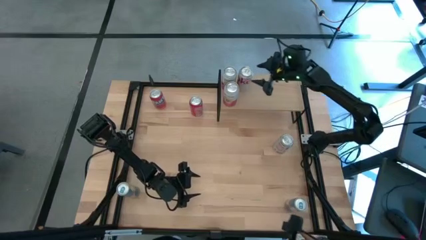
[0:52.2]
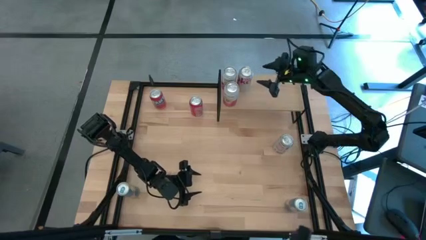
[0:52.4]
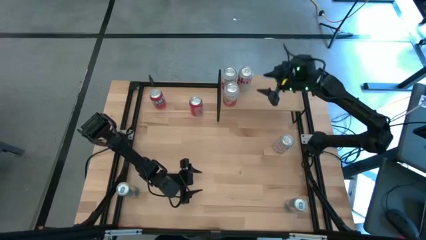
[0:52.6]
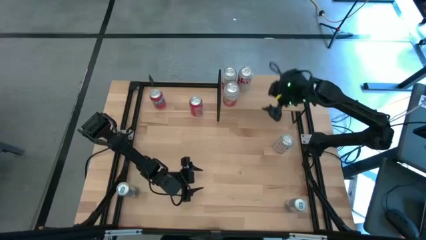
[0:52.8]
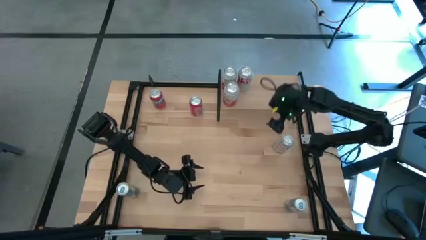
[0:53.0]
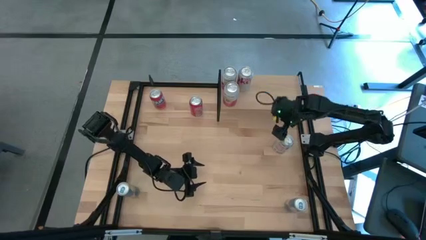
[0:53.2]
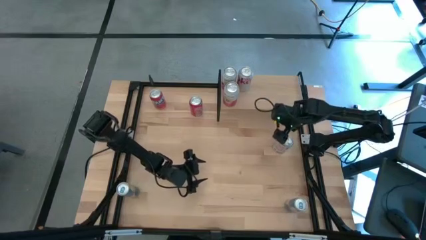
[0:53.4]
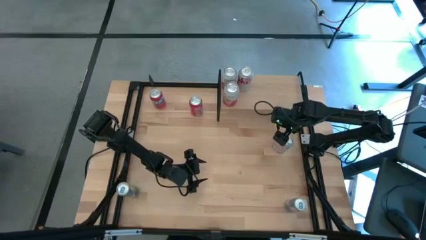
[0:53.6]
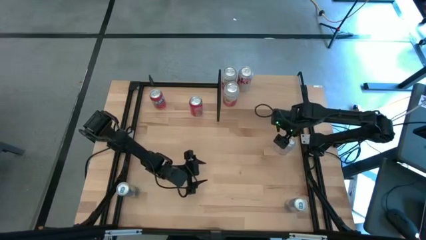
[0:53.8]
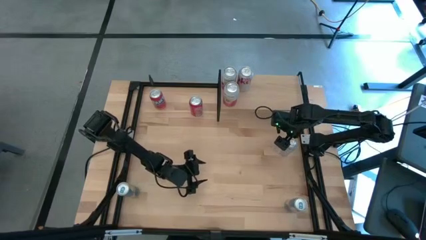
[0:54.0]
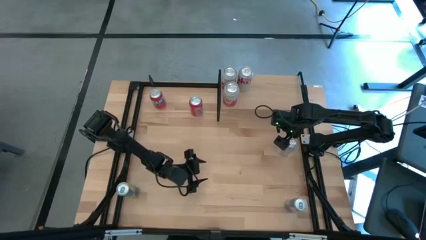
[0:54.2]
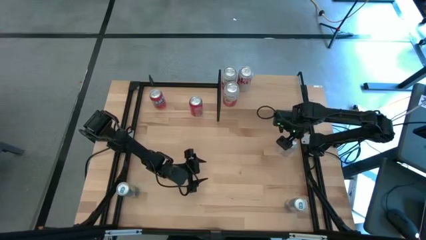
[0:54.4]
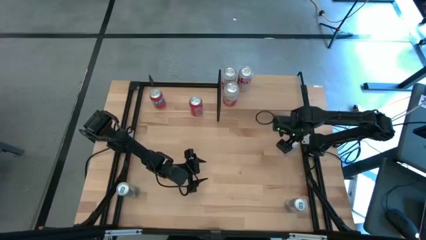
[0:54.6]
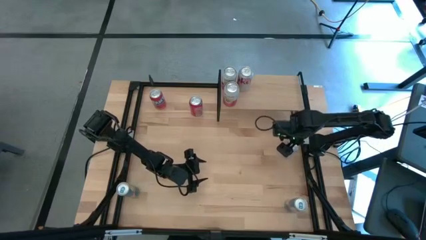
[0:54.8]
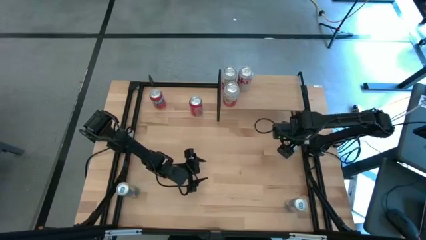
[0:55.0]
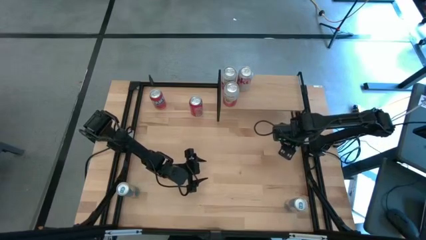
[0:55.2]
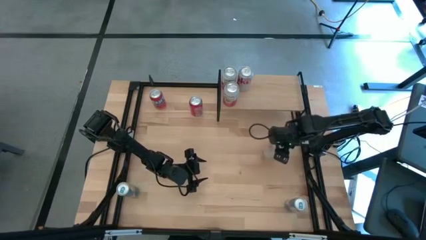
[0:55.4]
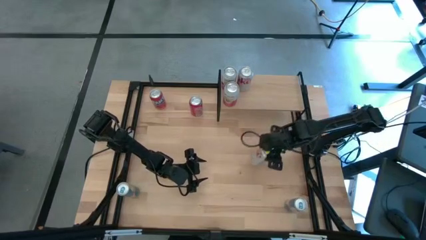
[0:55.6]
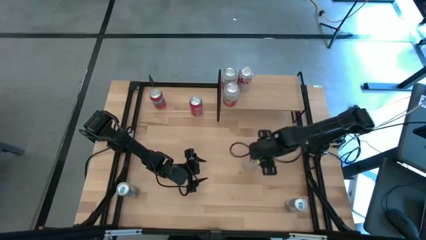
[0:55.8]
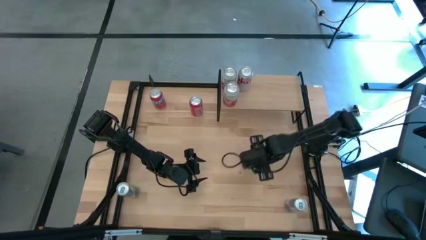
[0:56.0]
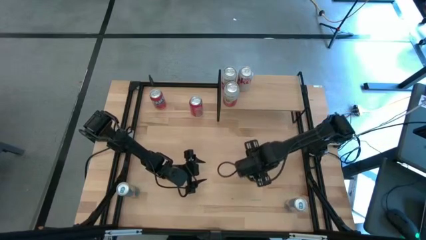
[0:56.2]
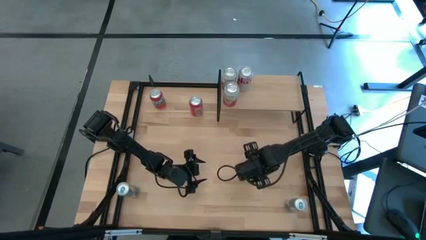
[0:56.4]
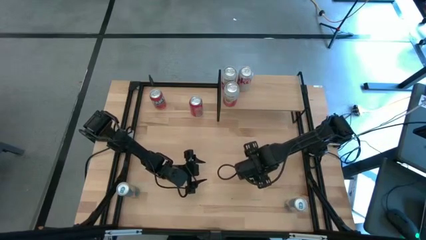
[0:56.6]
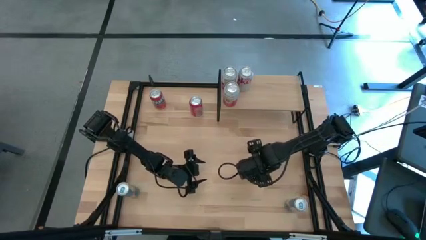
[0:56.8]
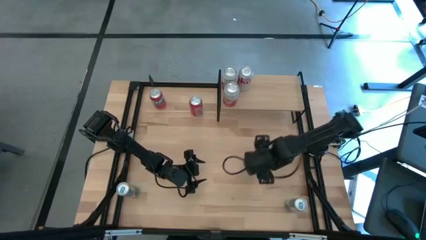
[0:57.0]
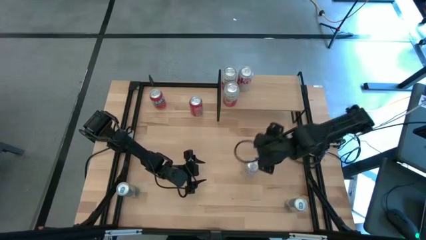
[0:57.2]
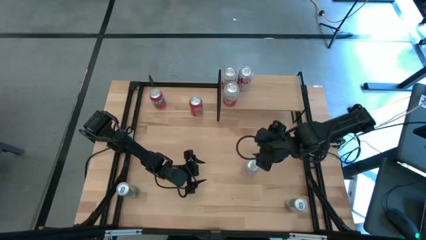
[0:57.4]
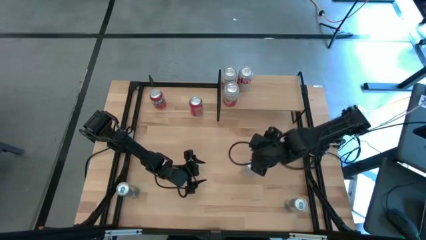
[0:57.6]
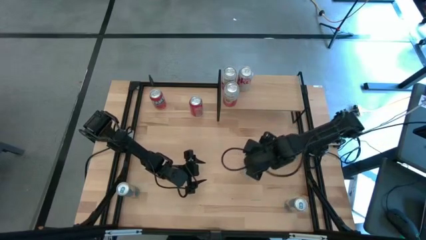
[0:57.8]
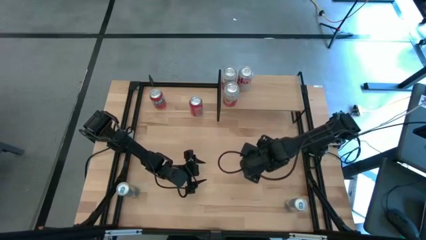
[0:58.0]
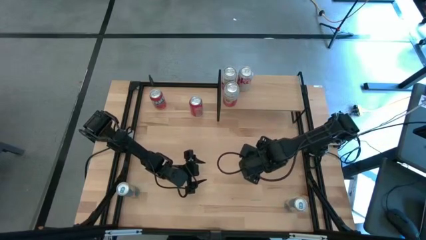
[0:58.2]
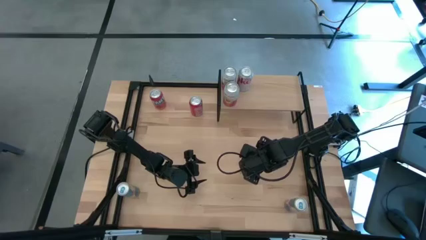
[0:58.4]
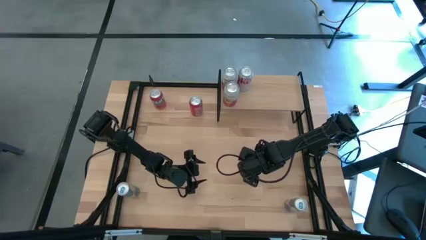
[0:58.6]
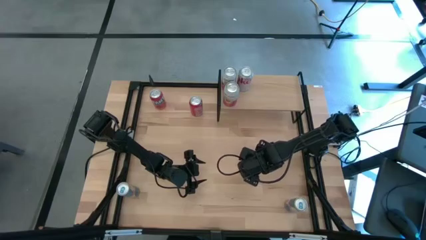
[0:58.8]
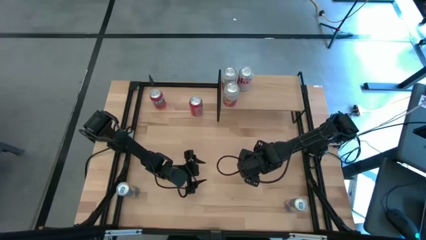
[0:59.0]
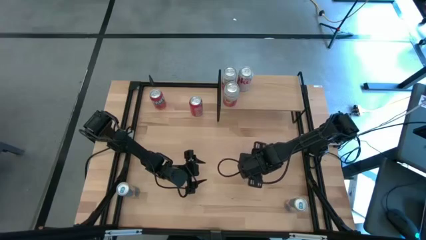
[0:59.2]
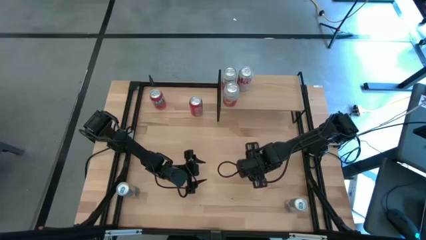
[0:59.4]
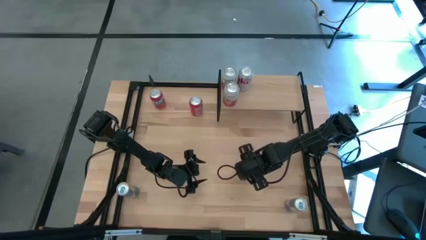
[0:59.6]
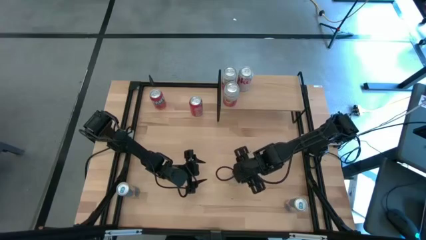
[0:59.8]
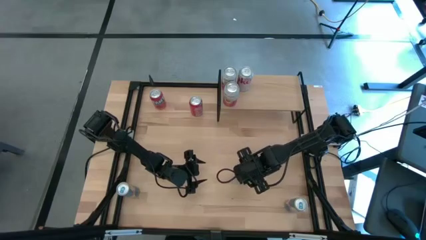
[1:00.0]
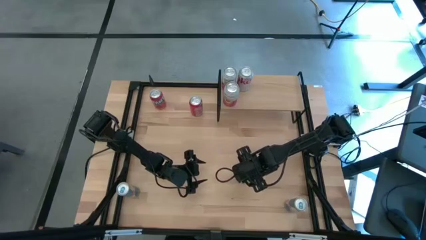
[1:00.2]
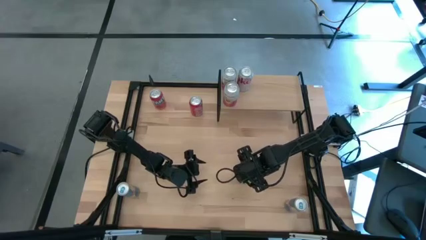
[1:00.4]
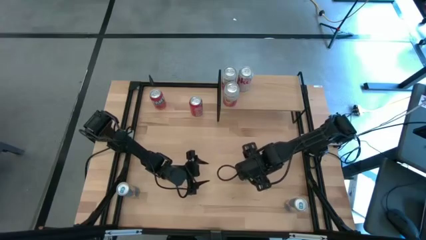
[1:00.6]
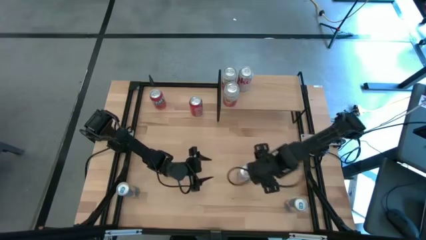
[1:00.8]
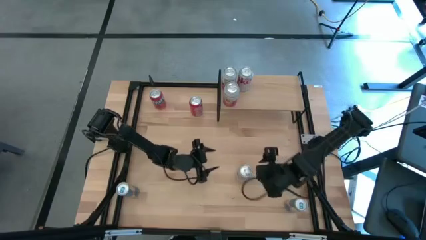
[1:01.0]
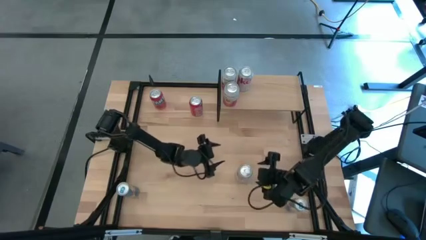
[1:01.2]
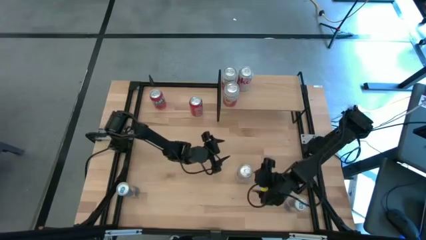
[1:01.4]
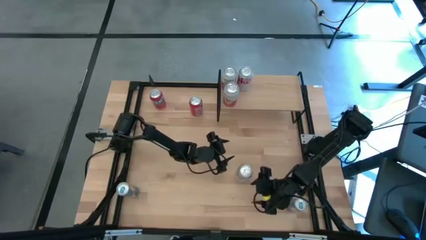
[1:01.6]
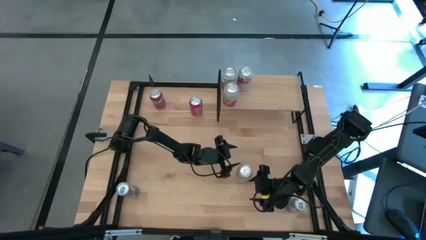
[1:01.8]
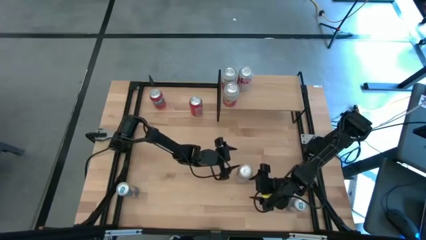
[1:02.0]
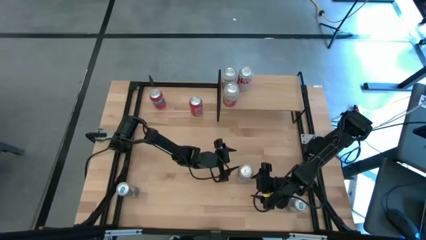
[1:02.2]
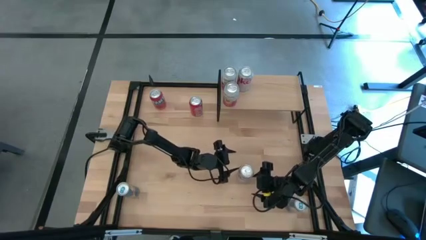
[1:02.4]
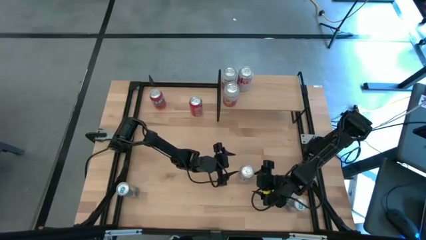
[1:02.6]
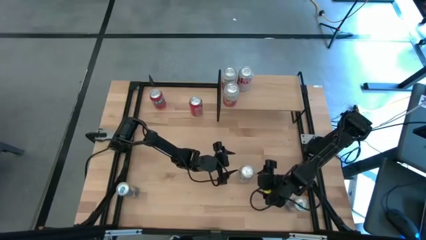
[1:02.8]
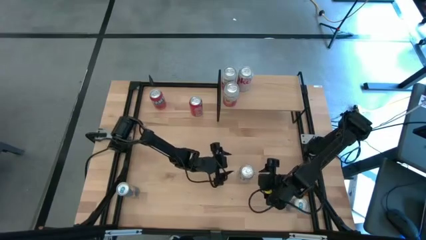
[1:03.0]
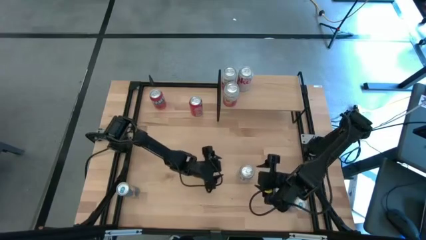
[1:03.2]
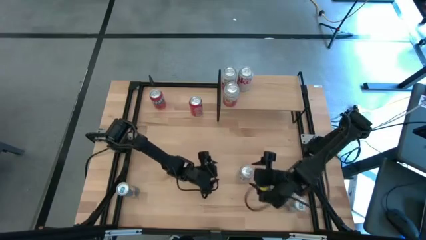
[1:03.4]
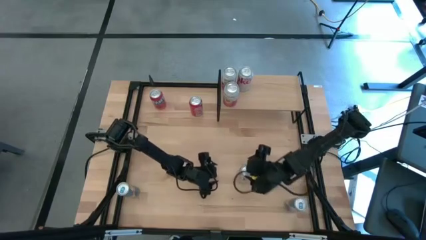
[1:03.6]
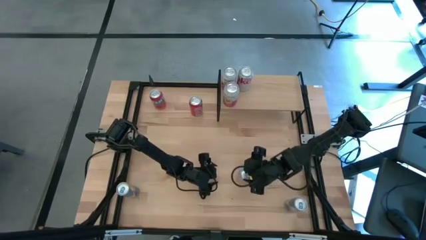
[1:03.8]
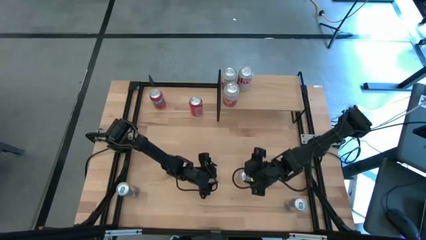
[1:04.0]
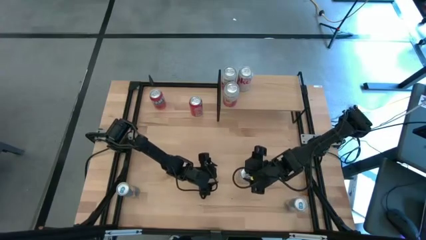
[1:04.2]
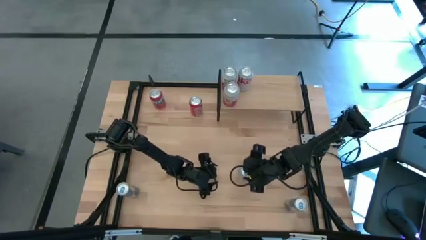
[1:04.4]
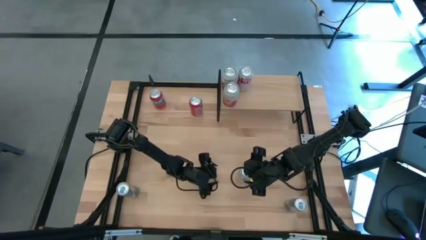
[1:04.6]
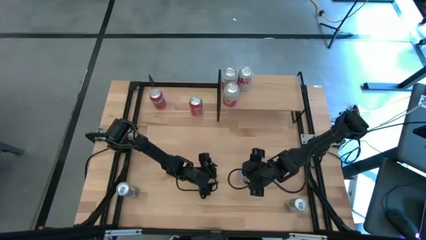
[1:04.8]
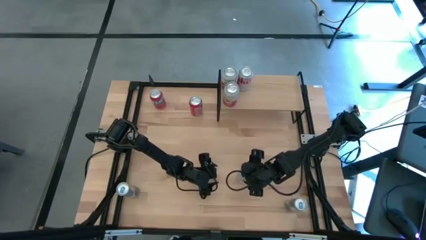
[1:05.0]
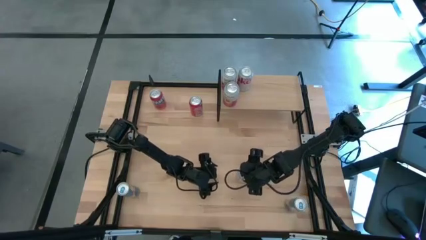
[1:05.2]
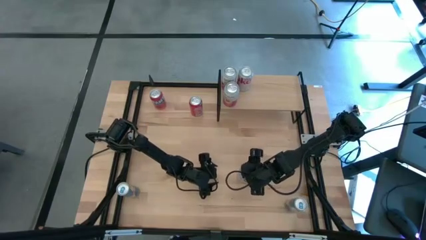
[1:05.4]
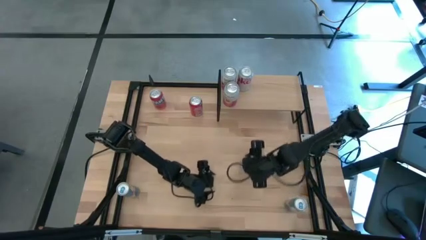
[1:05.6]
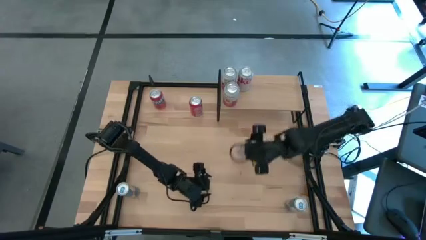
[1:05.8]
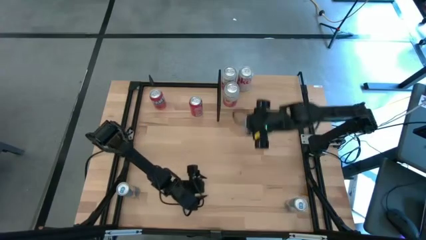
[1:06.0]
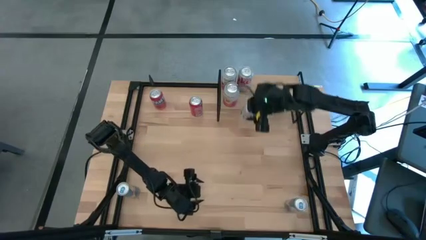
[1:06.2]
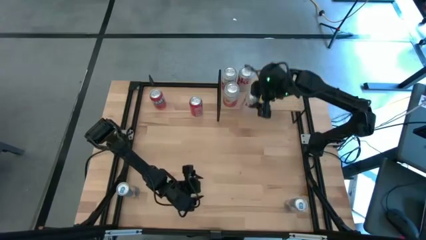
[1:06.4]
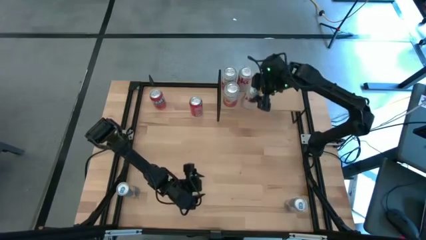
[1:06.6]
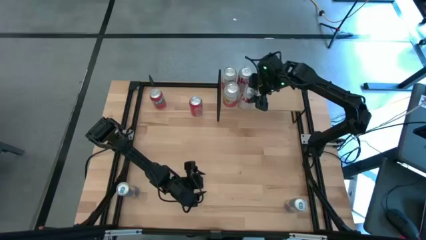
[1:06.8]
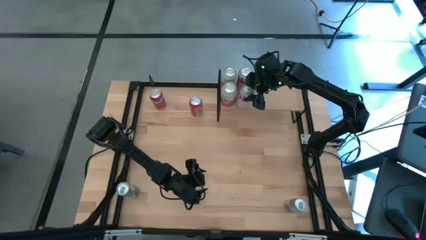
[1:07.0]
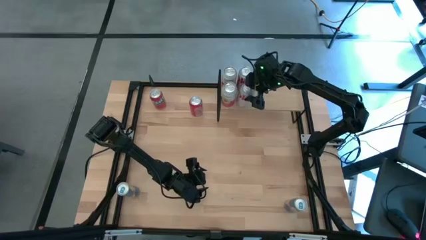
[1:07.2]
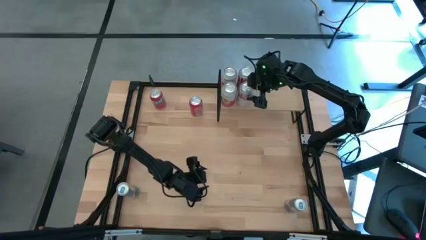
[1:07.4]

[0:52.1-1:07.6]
Task: Place canned beverage on shelf
Put the silver soda can on the shelf aligned with the other silver soda can
